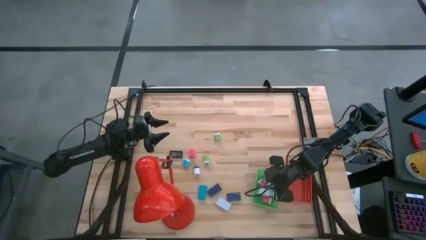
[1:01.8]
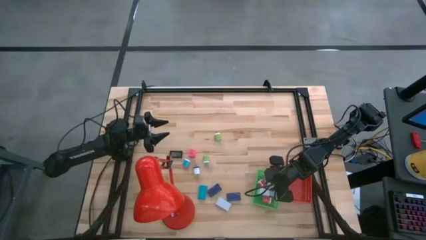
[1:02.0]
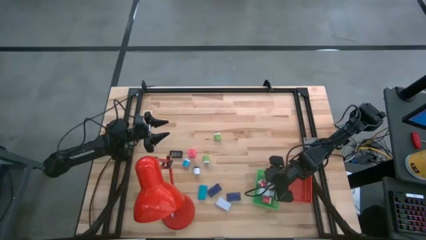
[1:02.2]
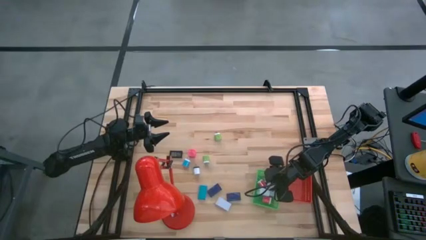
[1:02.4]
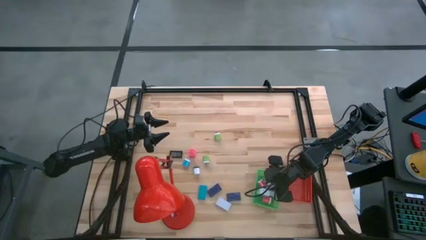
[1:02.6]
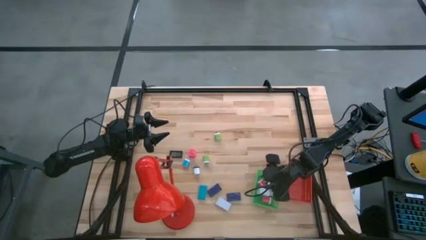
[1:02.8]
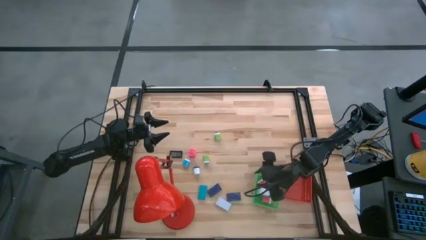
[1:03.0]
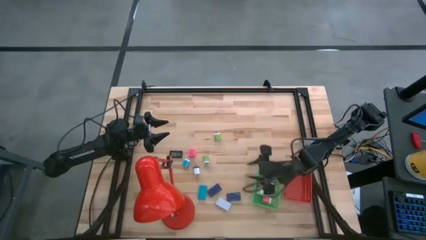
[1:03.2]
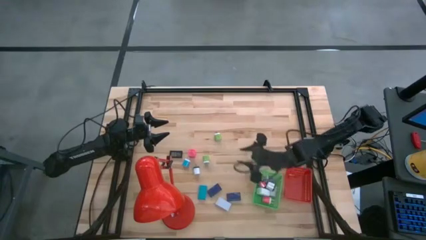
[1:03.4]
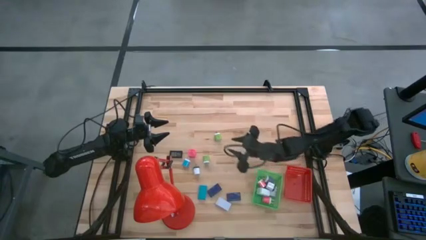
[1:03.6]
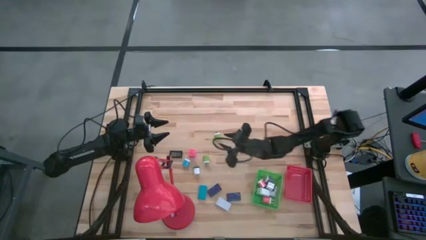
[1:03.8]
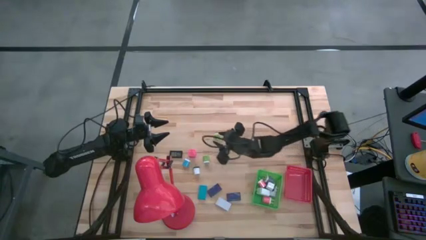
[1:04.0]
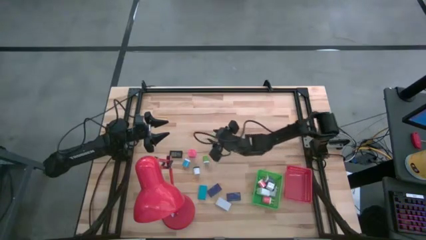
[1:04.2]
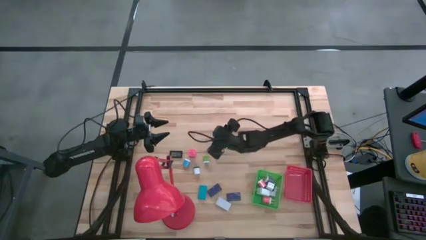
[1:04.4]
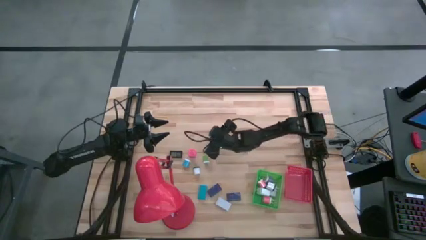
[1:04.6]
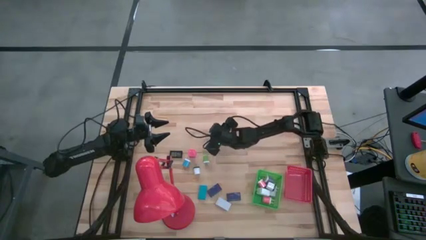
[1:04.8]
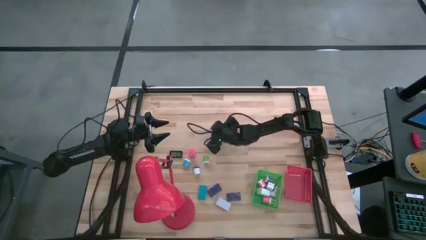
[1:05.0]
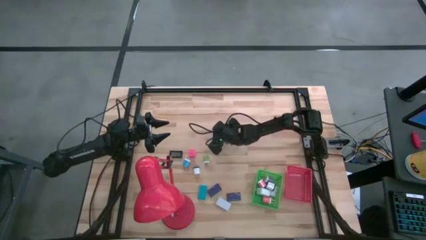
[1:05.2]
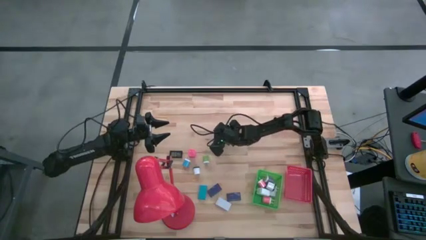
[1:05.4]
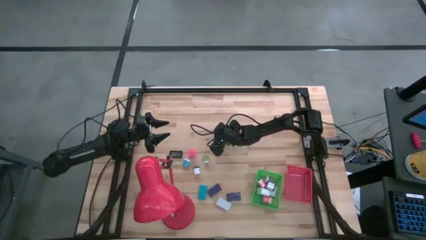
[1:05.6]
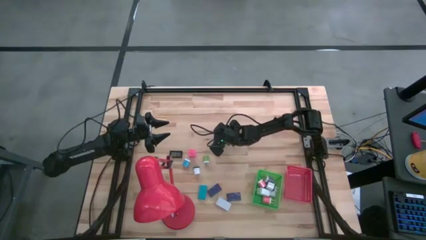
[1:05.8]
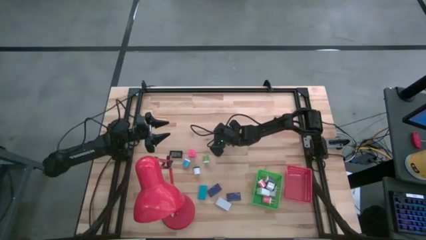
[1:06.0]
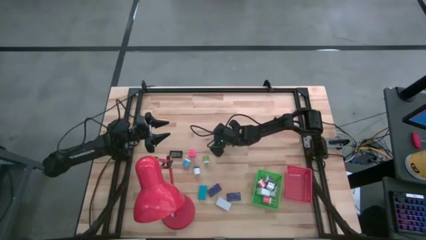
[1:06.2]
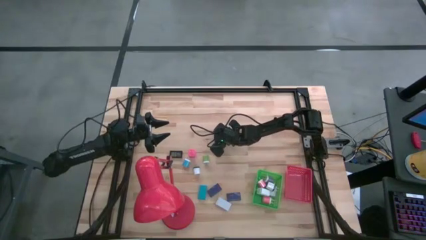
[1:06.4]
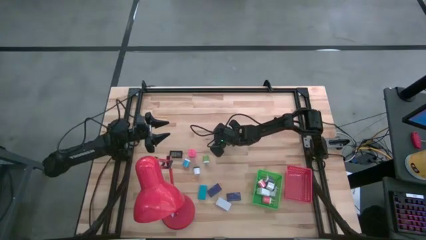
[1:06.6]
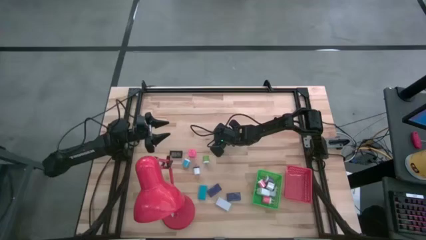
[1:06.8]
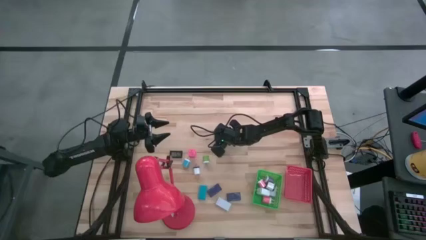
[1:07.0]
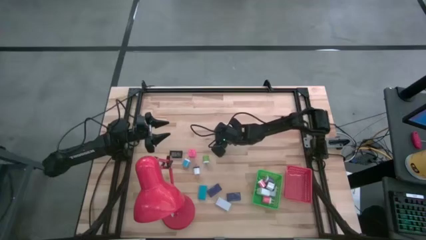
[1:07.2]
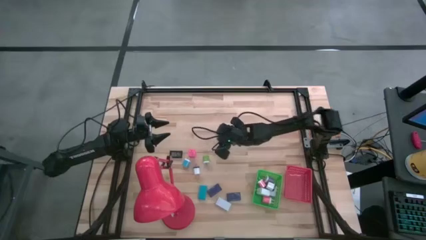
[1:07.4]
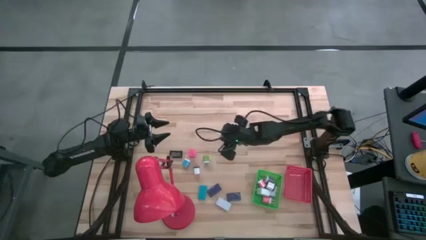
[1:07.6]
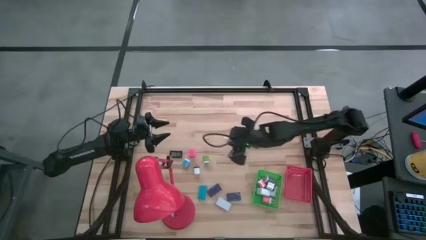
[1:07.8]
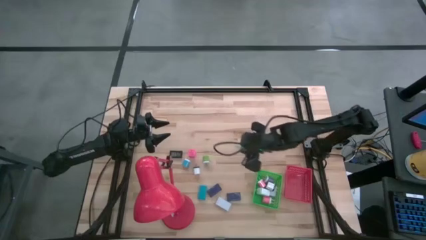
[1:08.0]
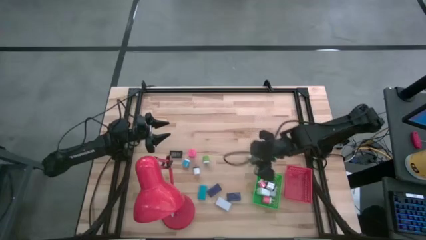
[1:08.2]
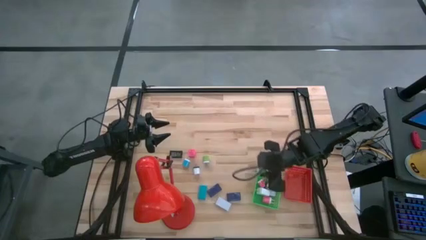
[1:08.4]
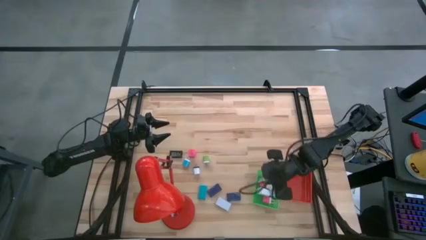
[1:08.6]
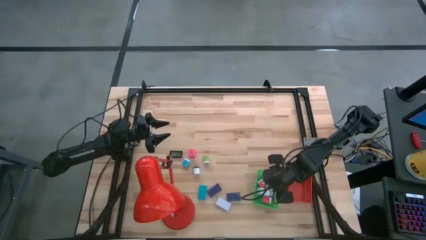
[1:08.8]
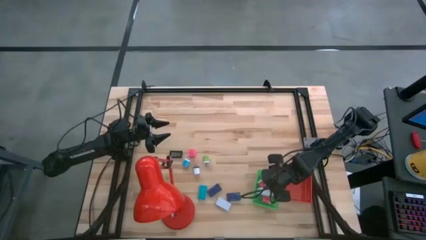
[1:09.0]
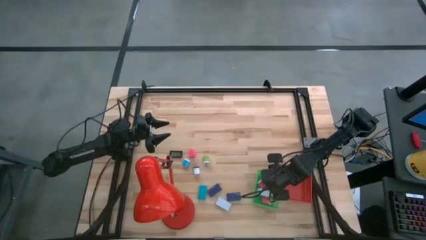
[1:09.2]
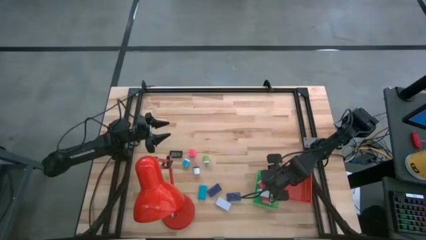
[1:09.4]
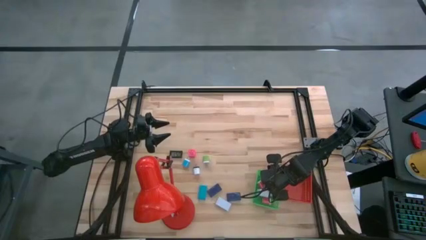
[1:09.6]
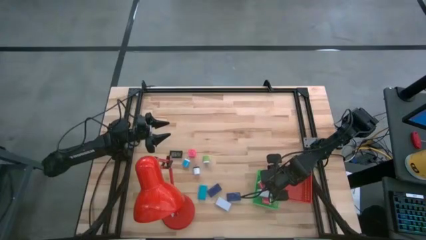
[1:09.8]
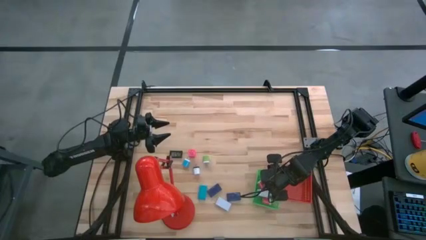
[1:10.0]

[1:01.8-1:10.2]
Task: Pick & Place Office items
Put the green charger adapter into the green basket

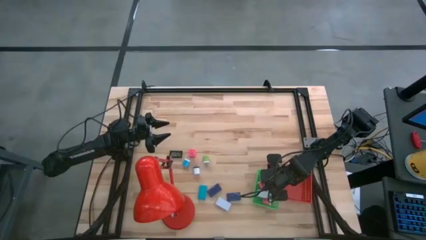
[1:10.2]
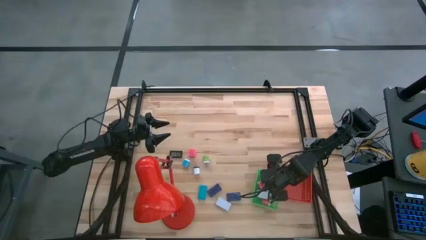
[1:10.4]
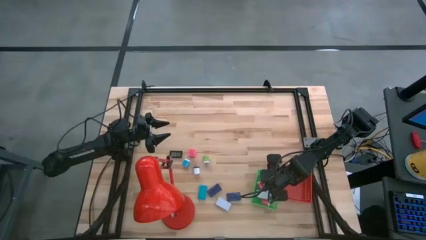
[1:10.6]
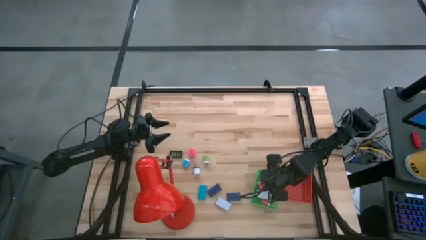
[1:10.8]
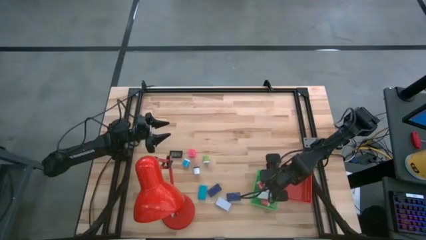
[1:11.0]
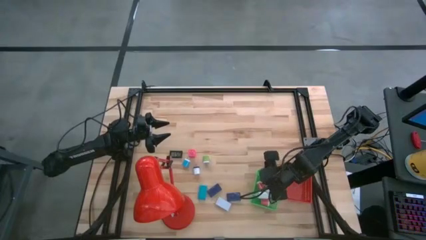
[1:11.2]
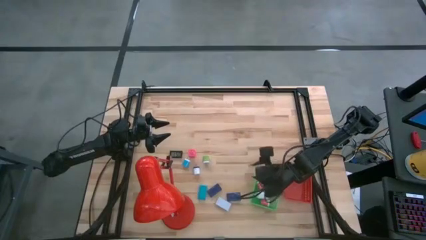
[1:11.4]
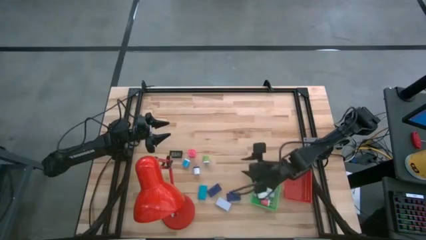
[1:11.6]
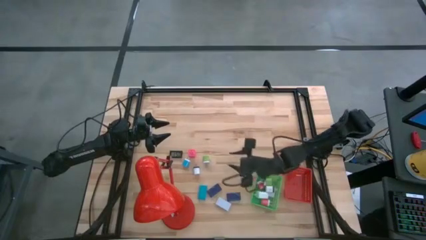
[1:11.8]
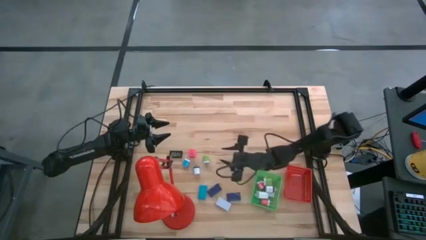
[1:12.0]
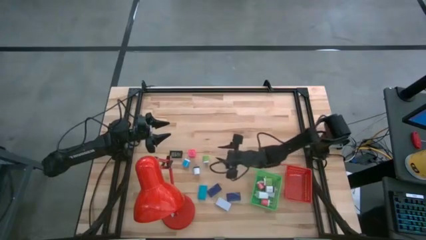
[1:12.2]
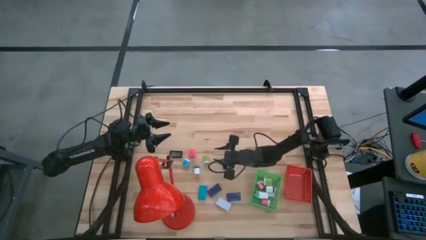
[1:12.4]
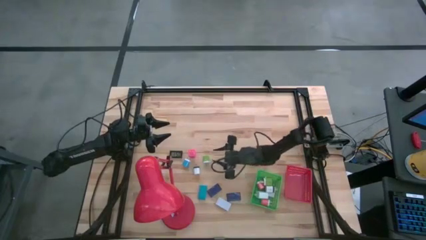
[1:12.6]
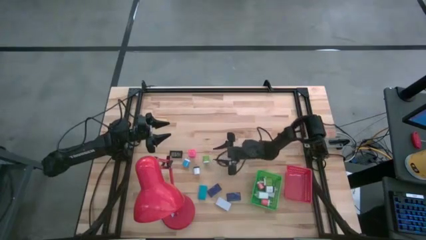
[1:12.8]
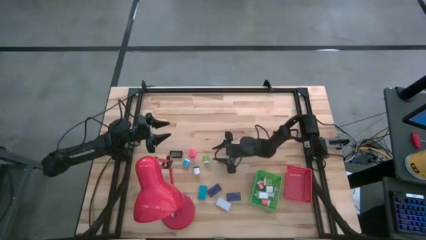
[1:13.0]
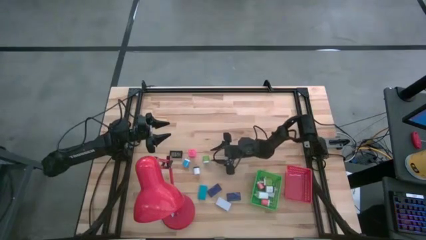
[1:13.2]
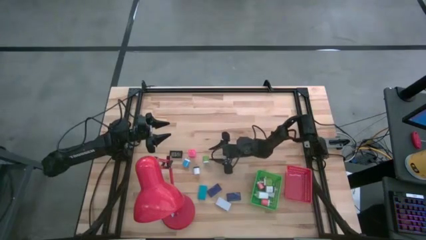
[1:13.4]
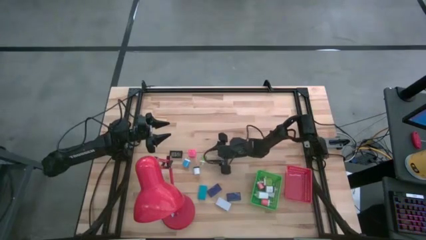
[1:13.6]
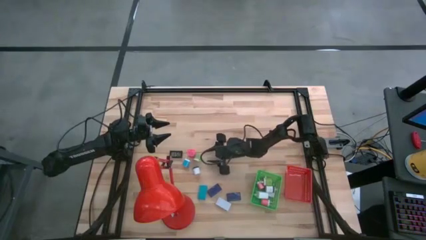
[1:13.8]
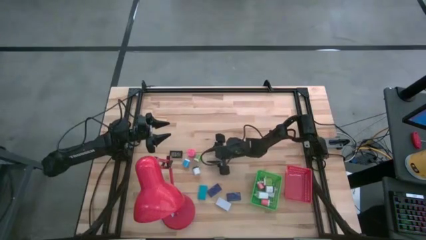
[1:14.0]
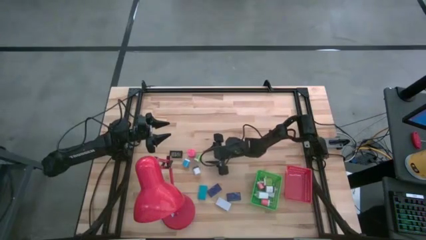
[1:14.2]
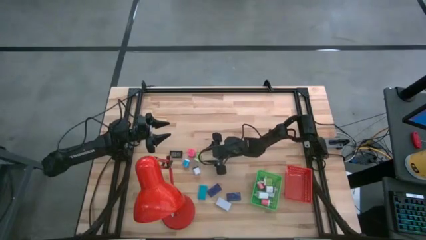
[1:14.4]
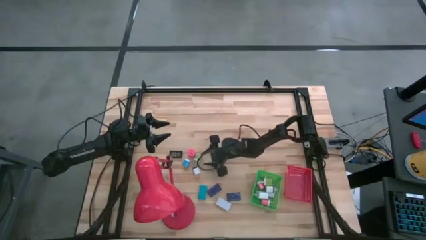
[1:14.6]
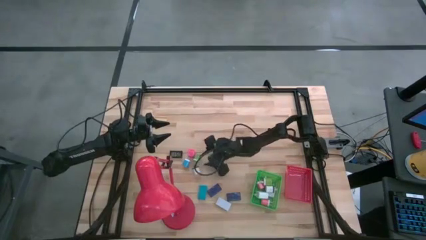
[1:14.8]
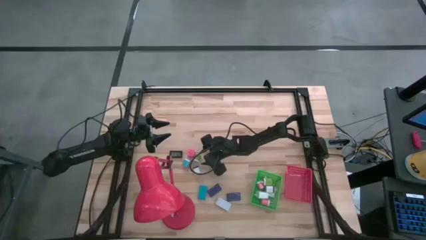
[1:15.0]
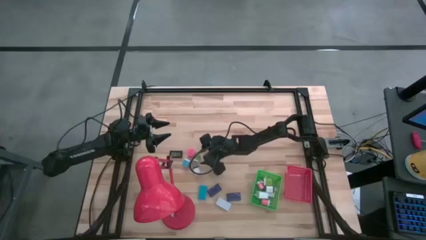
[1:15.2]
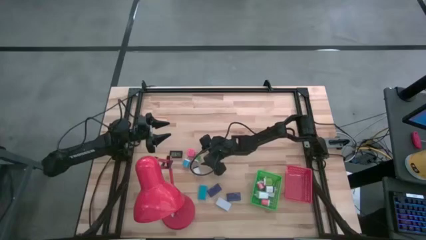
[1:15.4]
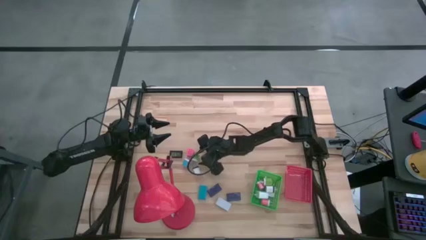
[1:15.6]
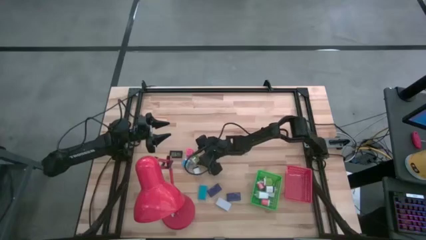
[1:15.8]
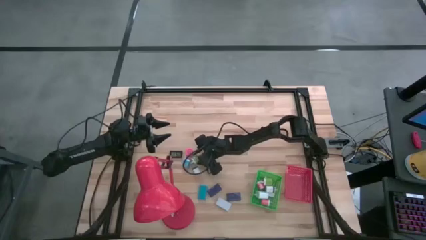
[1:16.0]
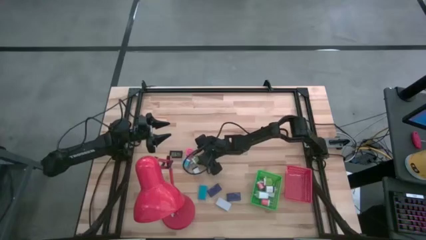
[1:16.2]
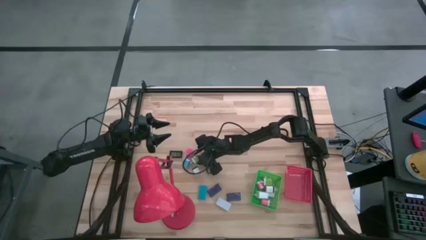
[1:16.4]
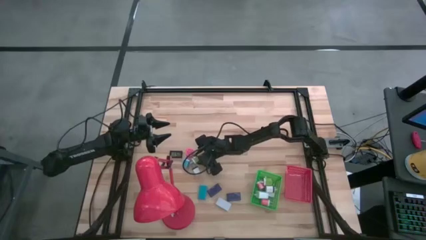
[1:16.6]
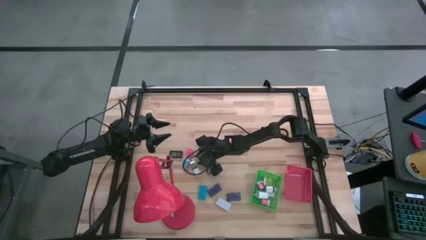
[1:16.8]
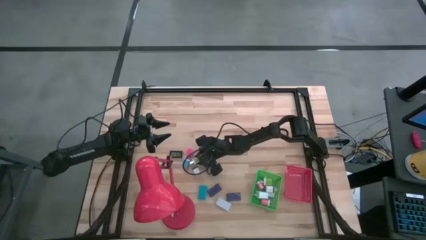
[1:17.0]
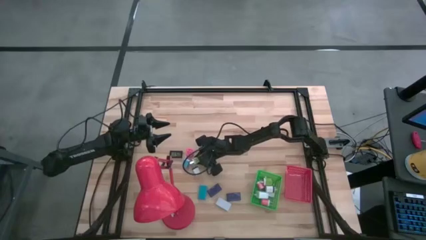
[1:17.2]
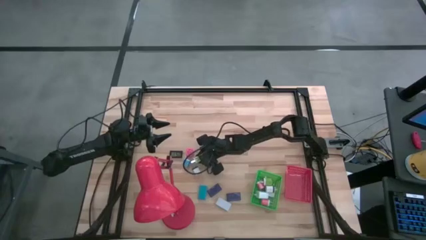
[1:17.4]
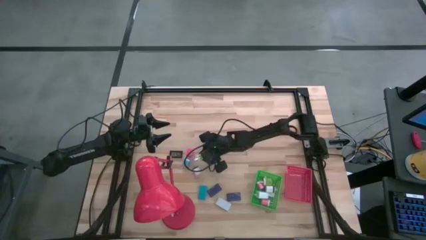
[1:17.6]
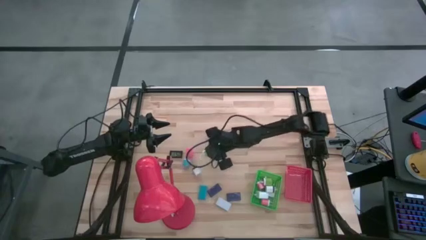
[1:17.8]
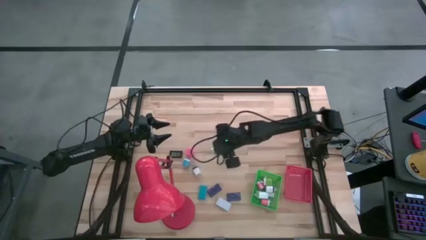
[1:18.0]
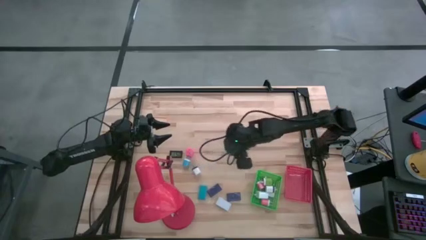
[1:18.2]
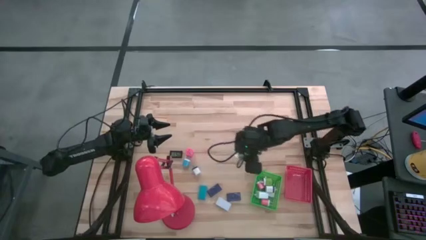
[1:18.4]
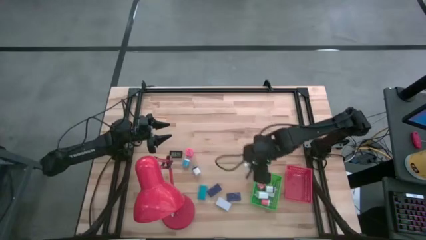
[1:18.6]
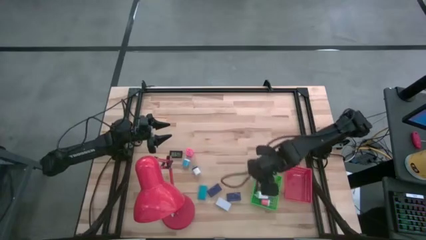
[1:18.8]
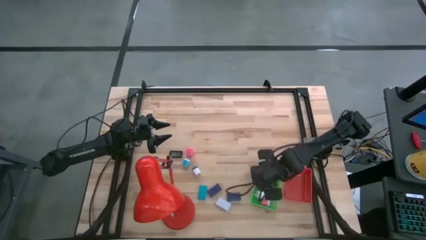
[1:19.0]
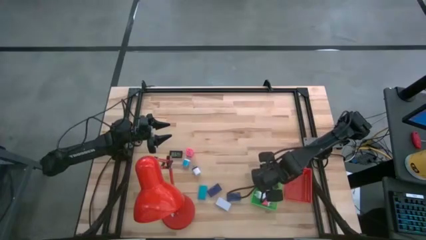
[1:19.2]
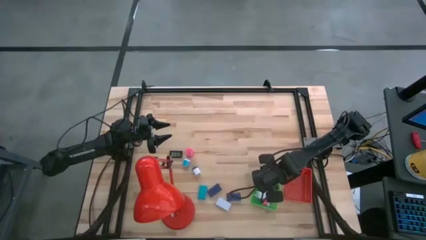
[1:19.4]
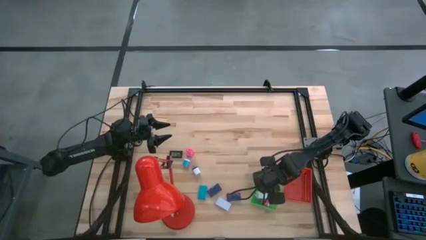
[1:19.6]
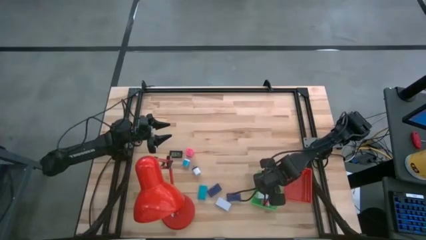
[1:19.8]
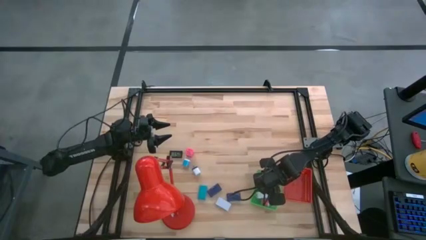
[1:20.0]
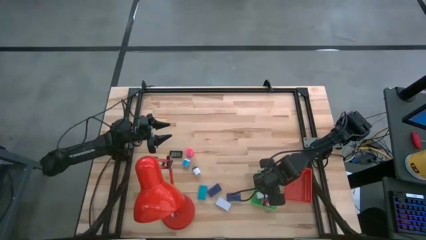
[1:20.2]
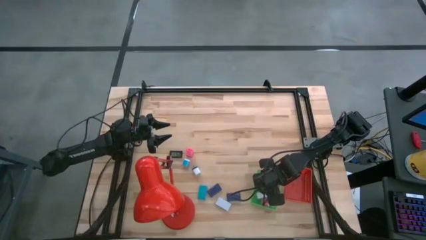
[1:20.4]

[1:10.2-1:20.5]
Put the green charger adapter into the green basket
